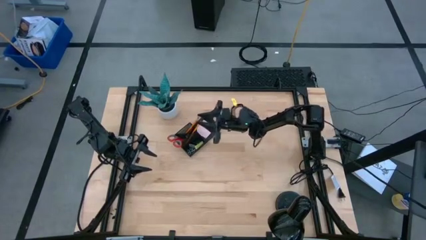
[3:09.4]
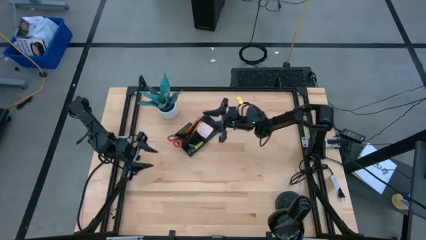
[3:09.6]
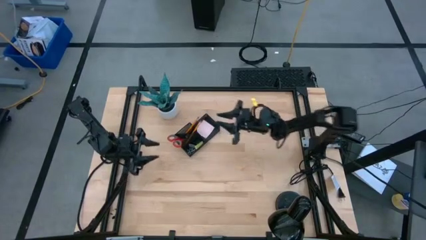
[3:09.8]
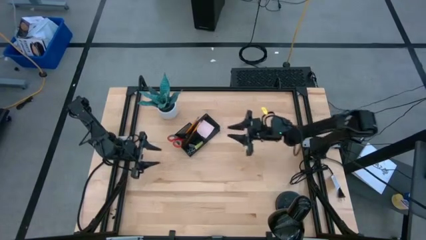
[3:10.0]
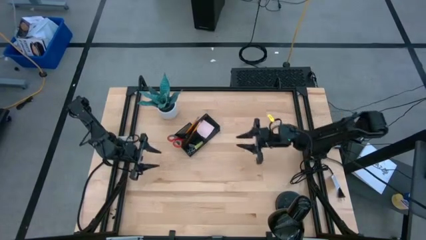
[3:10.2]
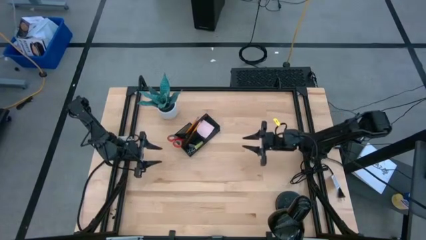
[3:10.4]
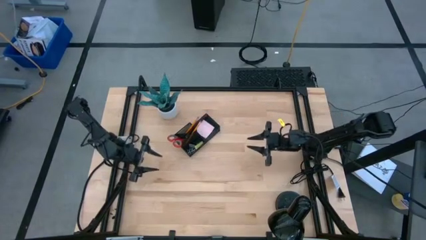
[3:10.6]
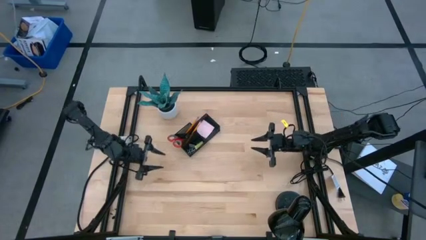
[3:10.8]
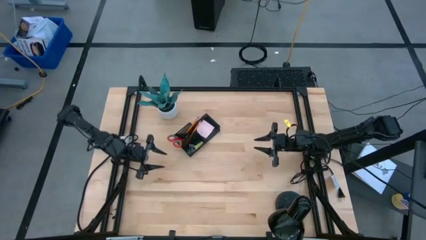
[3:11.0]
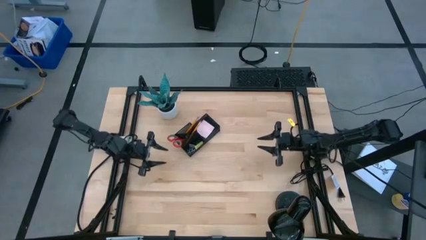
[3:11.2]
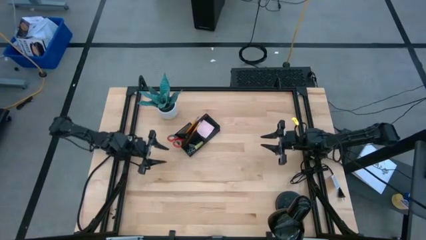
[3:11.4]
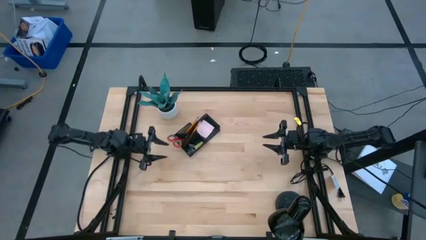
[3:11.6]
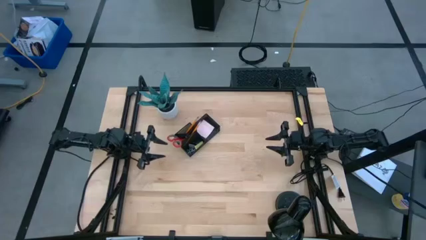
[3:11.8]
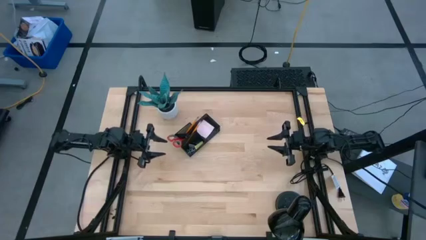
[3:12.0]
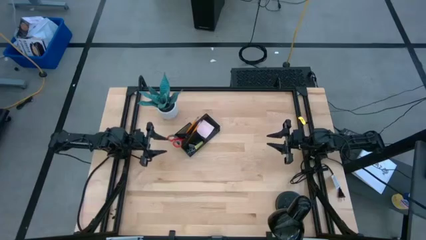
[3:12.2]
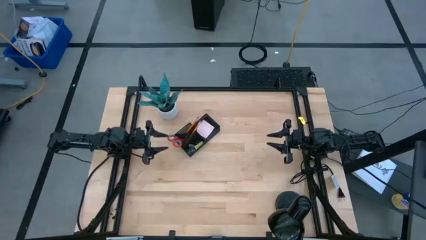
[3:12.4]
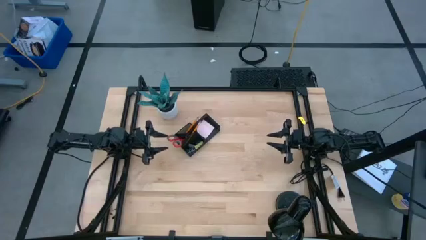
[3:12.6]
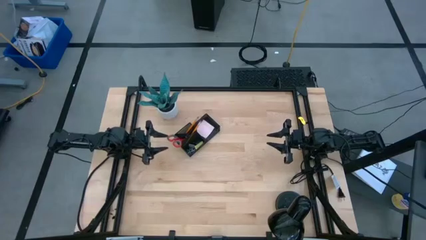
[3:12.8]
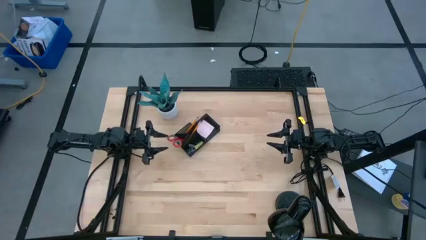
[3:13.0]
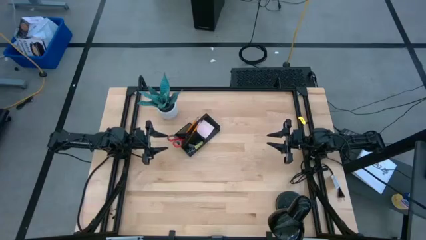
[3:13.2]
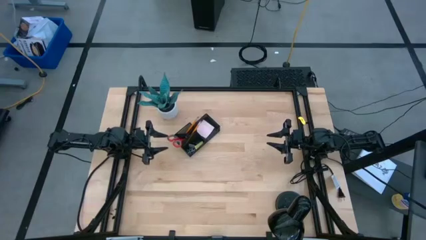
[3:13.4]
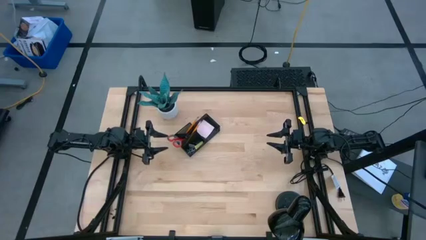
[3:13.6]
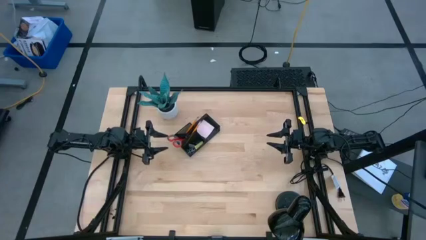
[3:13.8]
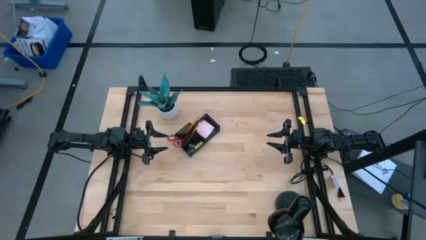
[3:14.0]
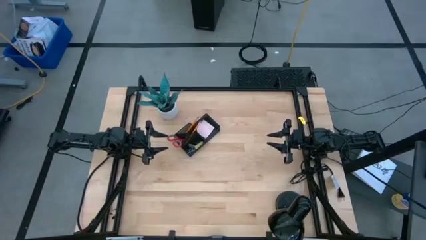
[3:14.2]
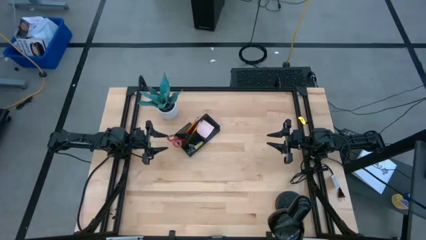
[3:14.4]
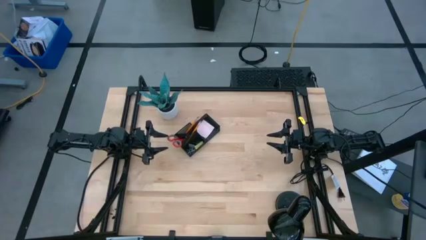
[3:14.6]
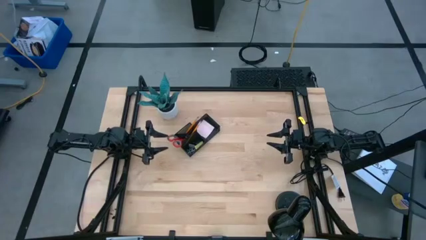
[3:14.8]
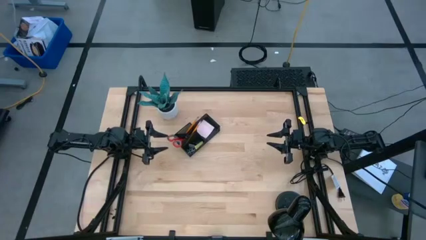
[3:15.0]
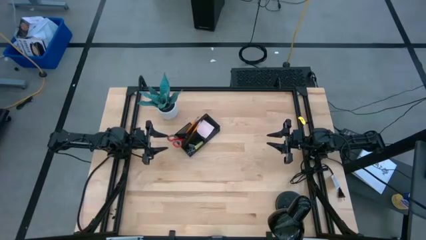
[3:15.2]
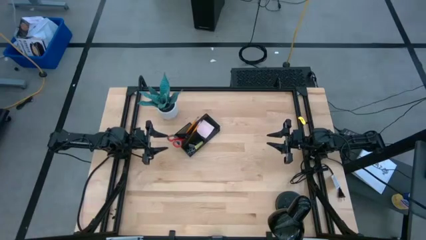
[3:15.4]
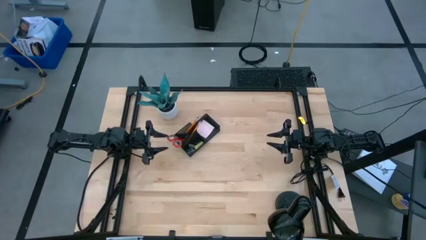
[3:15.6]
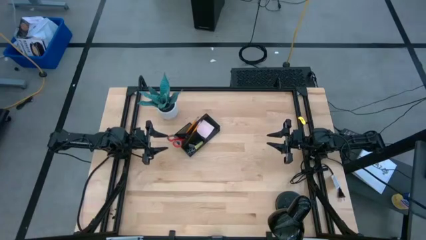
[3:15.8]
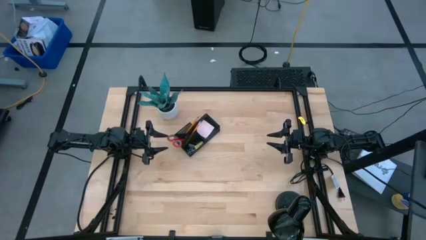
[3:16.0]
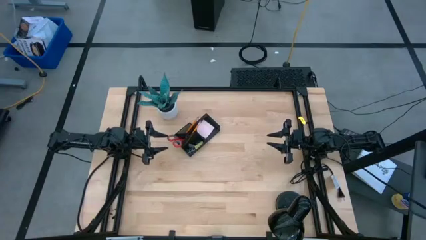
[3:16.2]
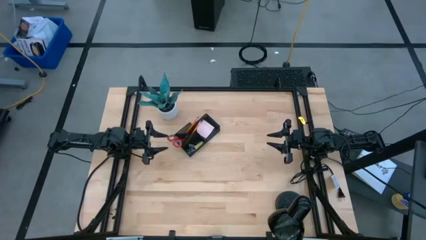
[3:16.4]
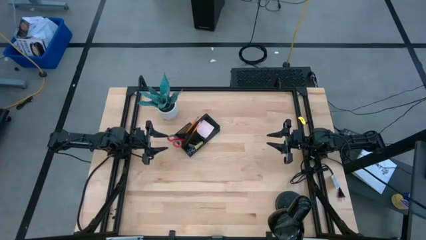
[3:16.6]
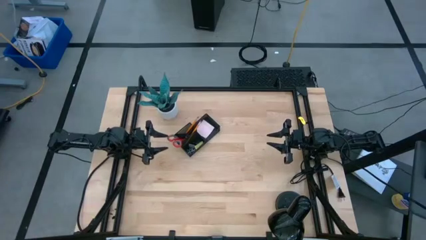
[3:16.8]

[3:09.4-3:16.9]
Task: Pick and place office supplies into organizer
Return to Home Position

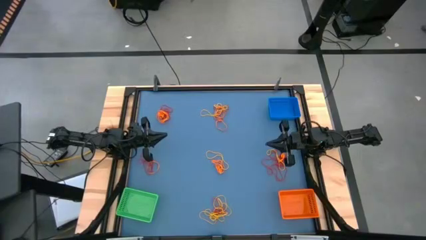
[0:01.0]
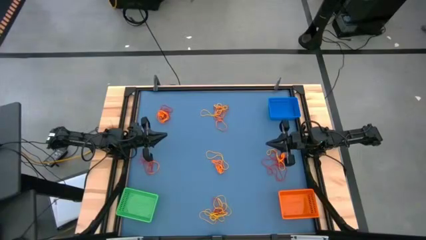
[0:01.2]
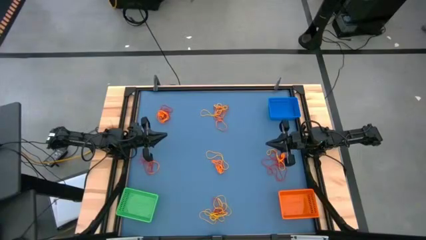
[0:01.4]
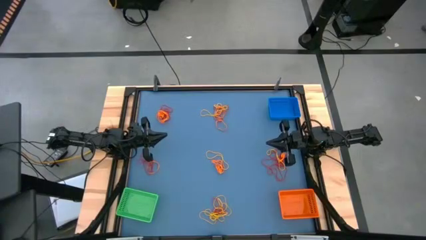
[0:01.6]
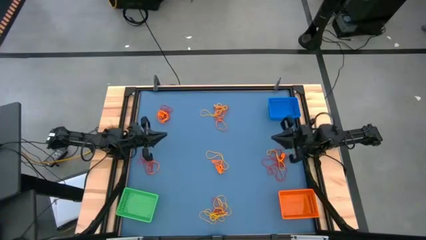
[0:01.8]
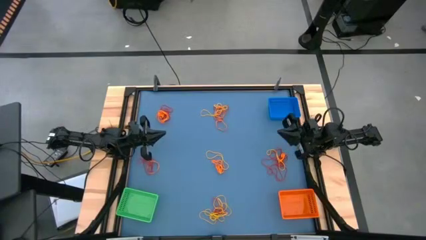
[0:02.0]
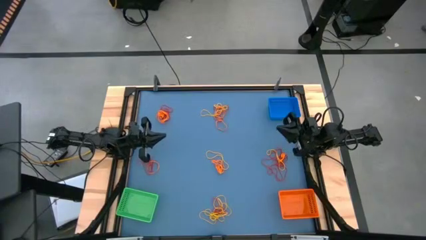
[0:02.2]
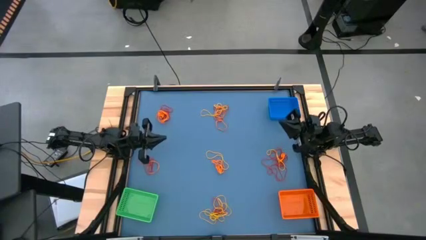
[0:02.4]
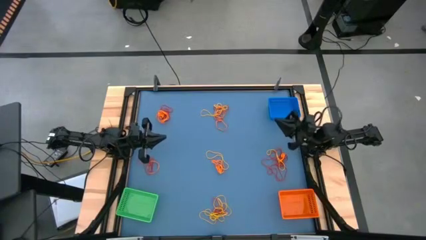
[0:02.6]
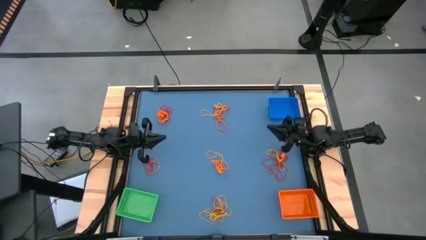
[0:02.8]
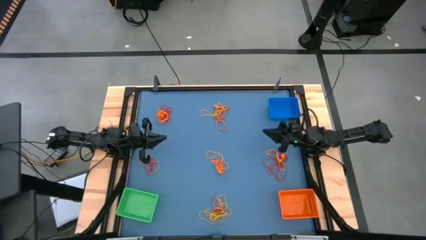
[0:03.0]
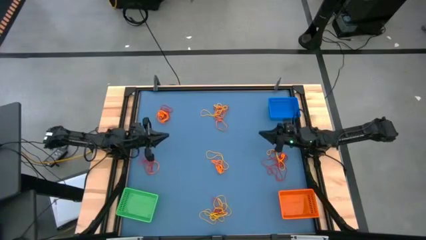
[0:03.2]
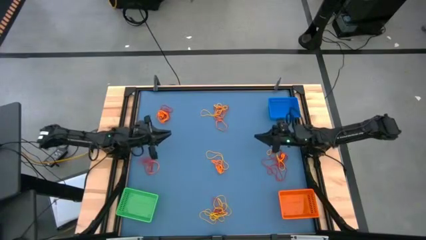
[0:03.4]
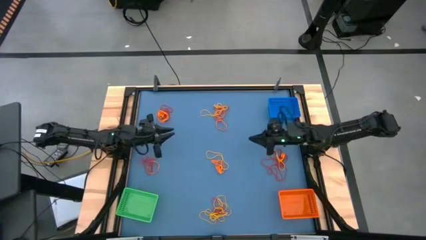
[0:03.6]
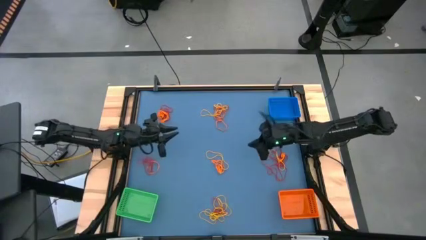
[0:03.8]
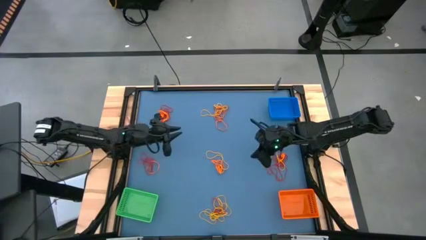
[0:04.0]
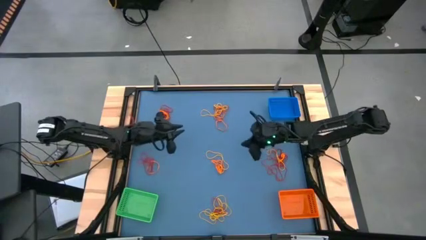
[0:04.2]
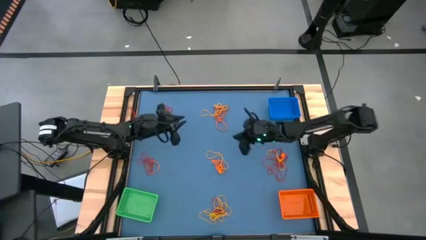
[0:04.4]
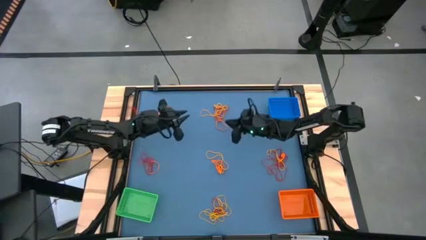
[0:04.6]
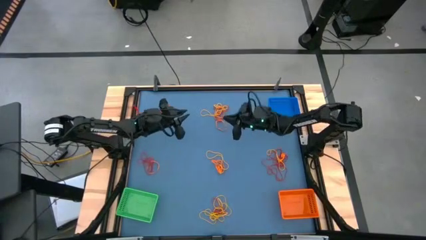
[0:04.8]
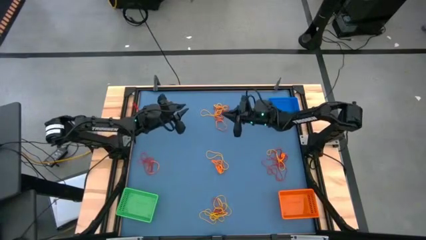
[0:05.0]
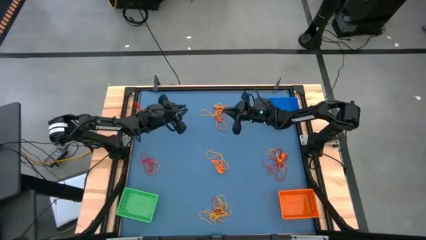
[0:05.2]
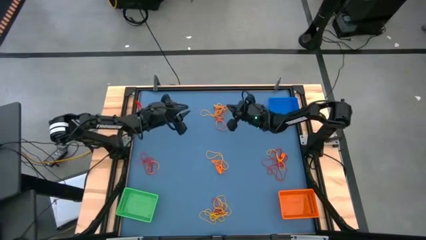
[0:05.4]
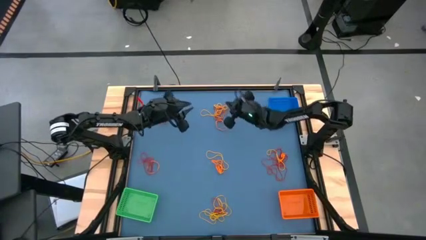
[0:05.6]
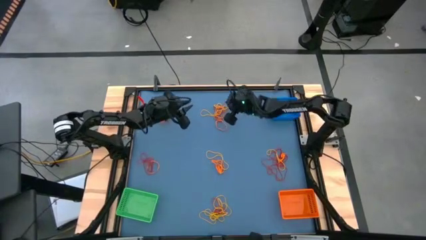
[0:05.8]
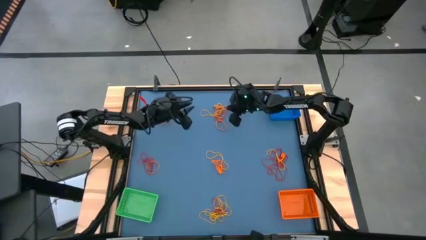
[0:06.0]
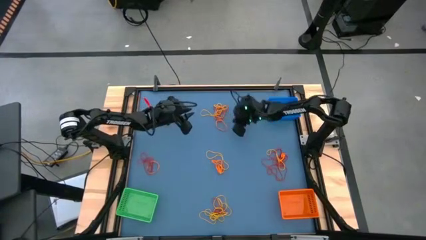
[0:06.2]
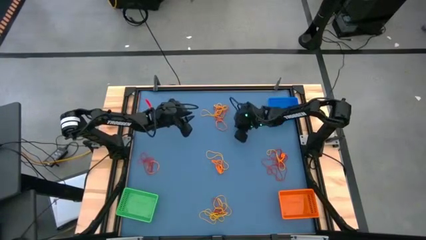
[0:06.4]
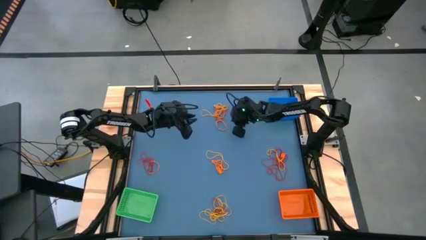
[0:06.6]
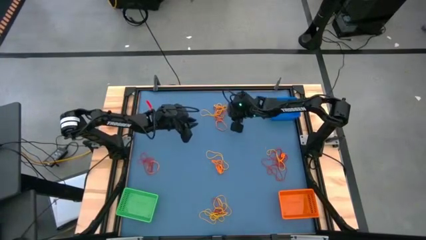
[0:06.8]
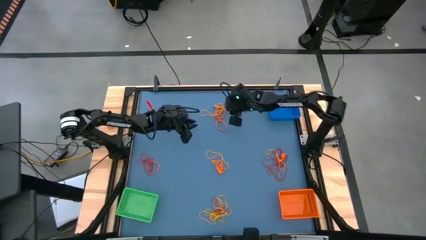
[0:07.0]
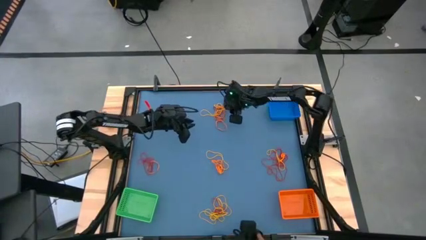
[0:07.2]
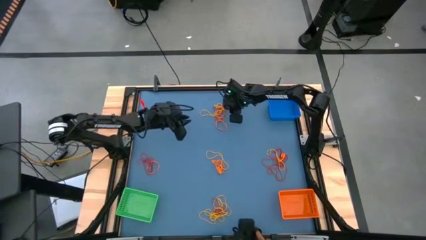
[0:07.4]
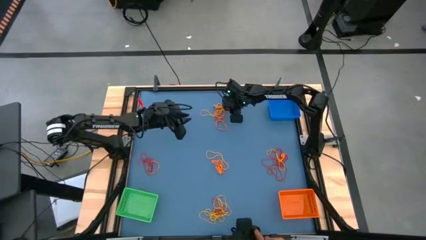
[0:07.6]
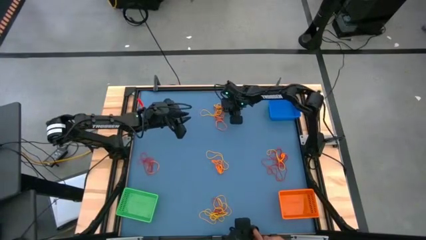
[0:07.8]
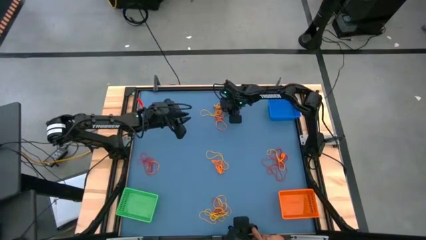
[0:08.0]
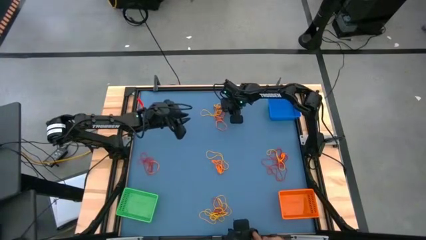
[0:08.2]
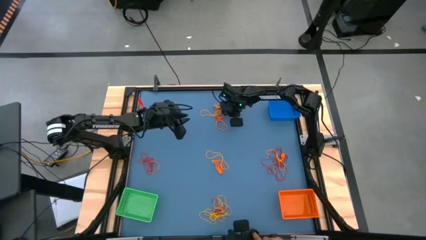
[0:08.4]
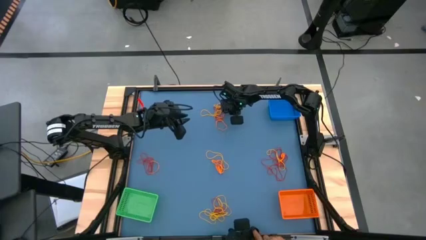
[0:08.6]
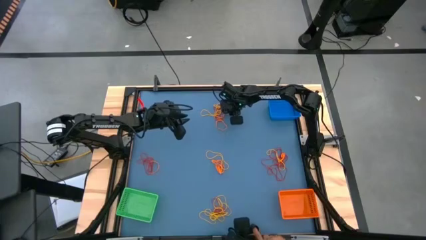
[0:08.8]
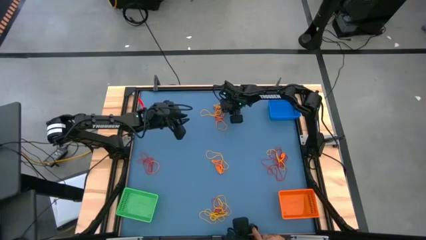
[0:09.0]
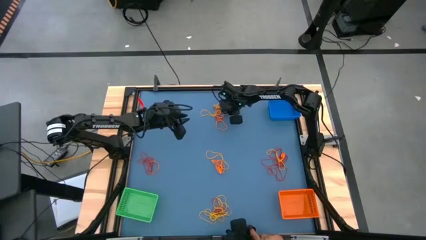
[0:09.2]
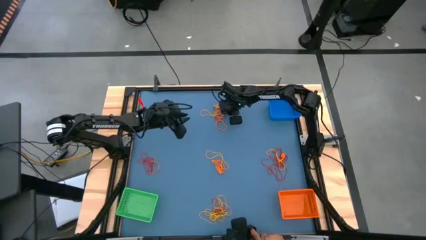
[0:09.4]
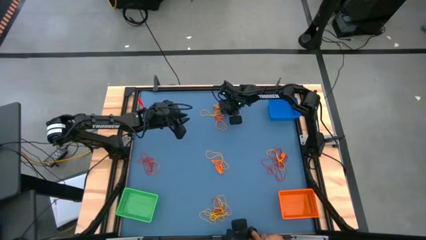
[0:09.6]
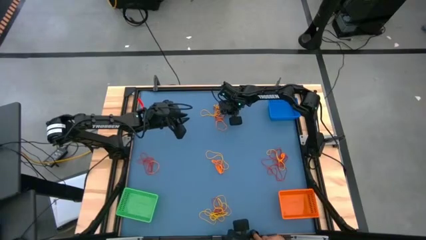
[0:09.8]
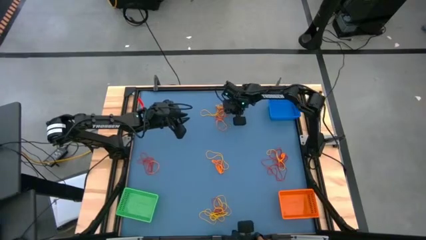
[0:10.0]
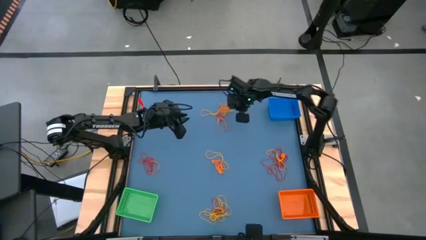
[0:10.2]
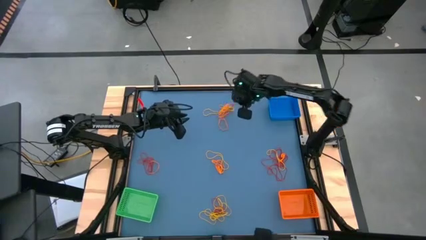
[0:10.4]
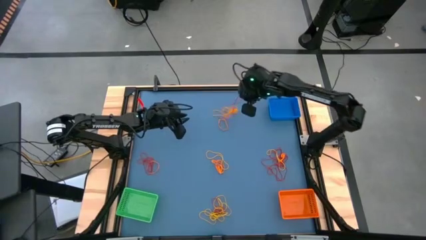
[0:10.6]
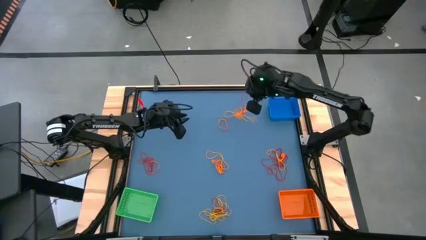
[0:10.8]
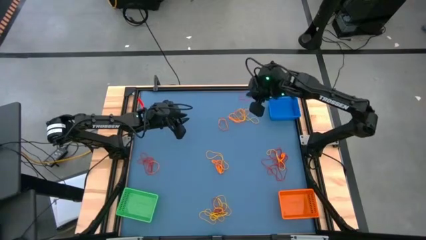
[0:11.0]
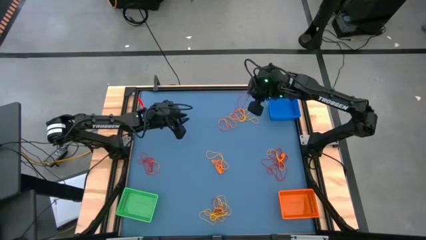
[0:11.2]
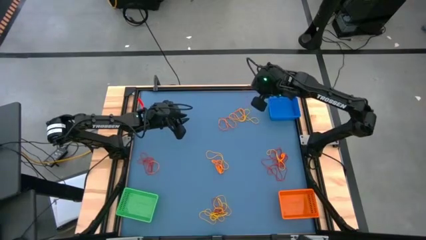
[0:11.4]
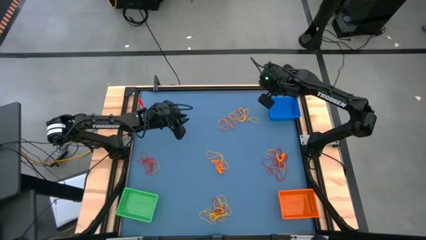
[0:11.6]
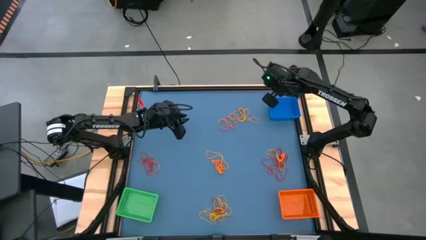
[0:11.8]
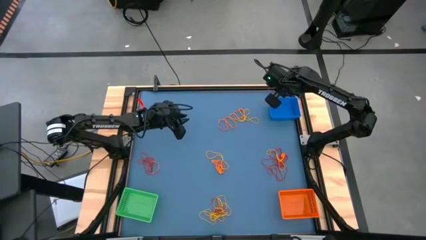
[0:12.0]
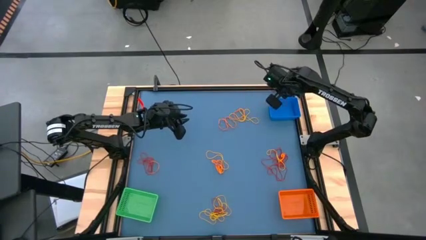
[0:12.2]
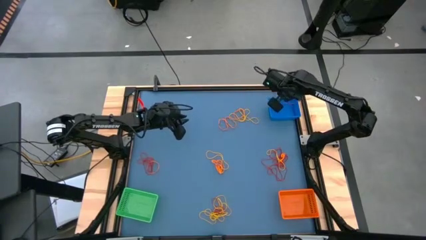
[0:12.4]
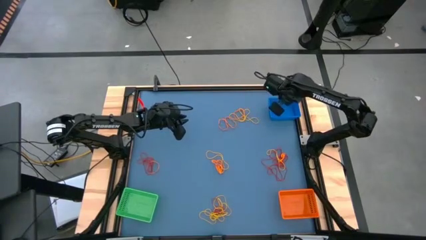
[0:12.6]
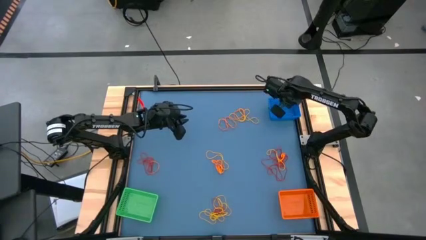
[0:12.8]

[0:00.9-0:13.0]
Task: Sort rubber bands into baskets
Put the red rubber band into the blue basket
